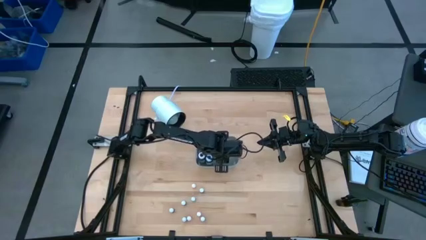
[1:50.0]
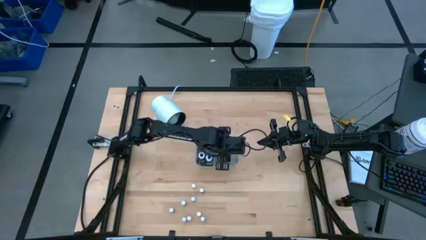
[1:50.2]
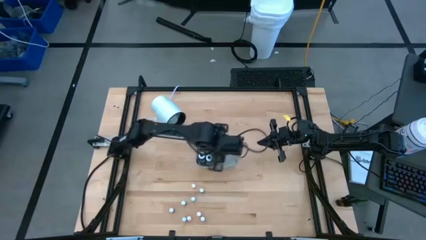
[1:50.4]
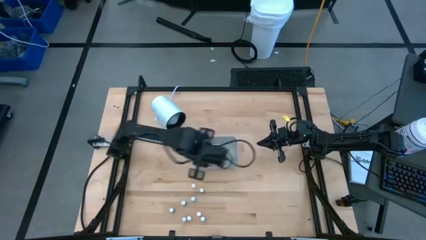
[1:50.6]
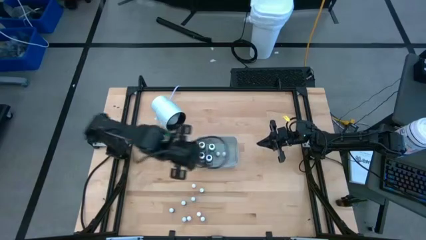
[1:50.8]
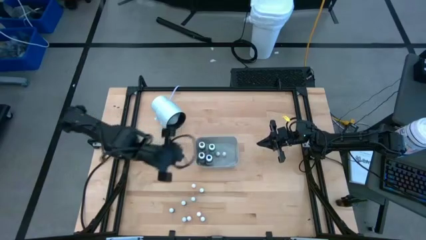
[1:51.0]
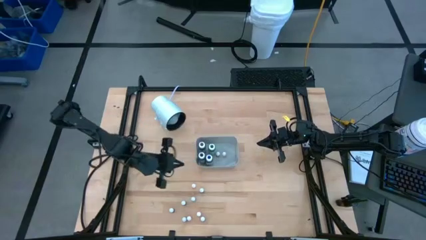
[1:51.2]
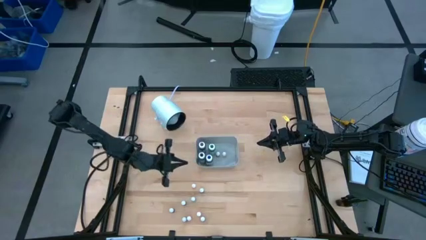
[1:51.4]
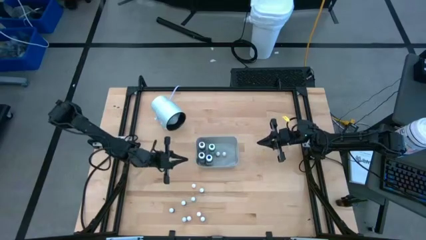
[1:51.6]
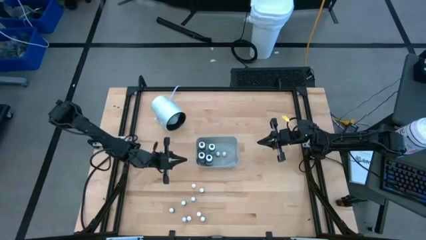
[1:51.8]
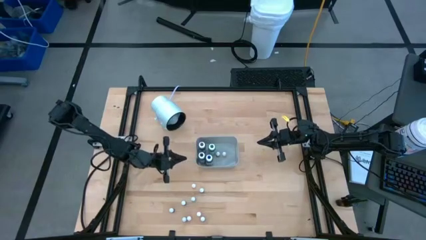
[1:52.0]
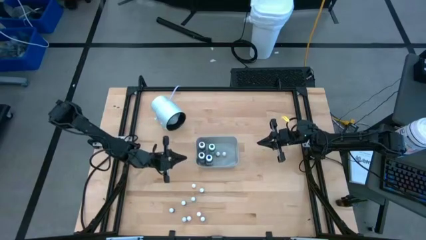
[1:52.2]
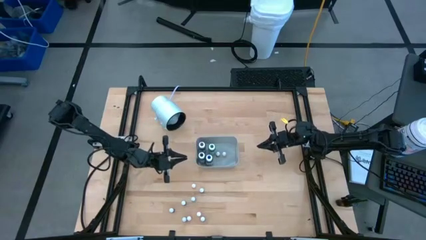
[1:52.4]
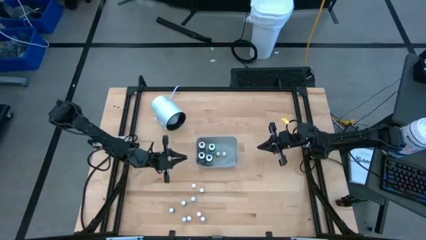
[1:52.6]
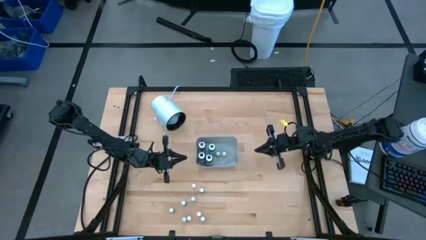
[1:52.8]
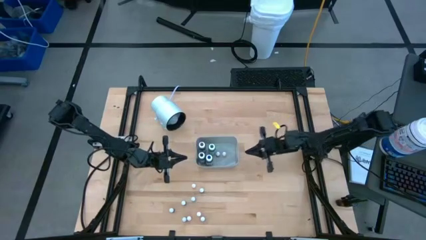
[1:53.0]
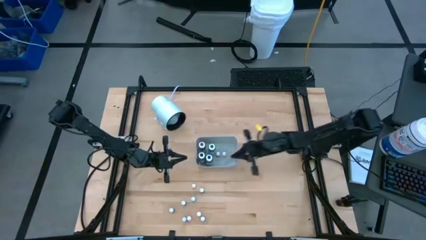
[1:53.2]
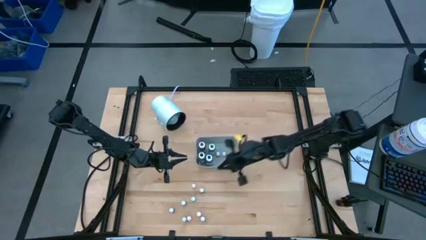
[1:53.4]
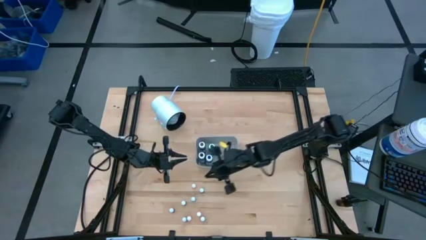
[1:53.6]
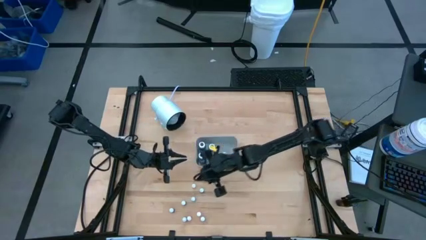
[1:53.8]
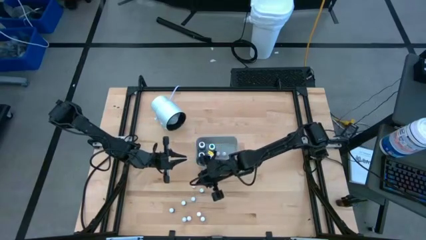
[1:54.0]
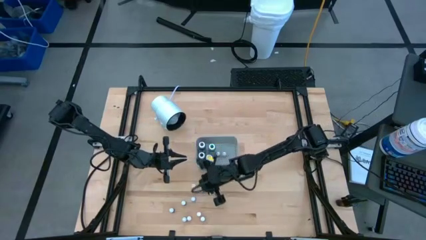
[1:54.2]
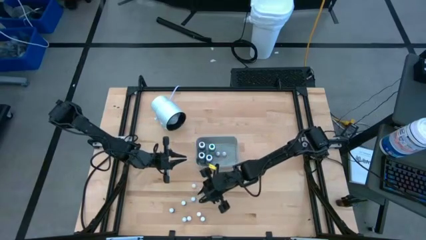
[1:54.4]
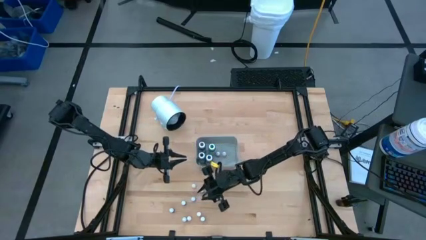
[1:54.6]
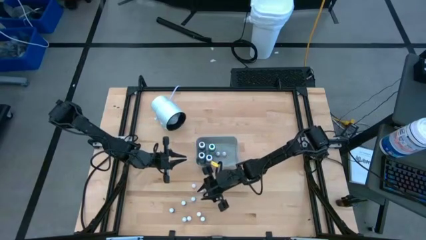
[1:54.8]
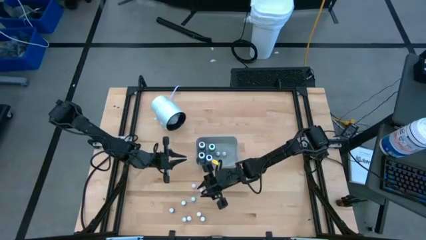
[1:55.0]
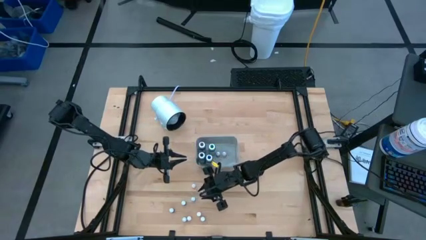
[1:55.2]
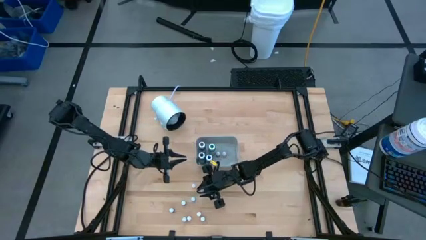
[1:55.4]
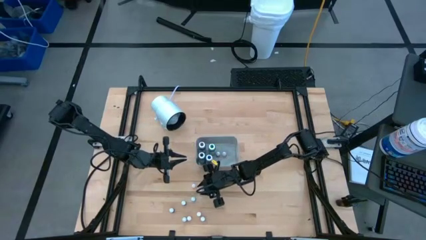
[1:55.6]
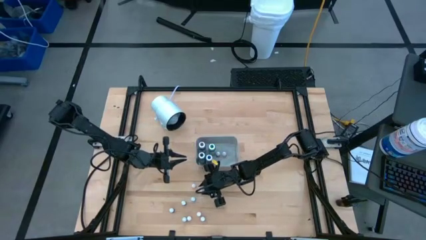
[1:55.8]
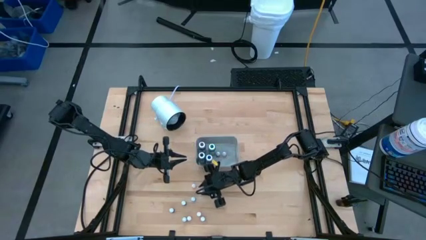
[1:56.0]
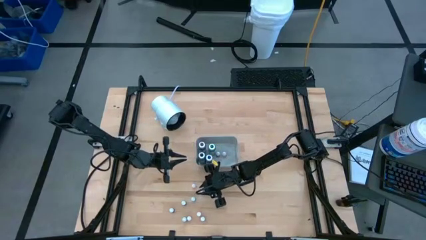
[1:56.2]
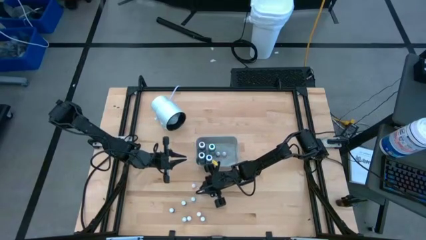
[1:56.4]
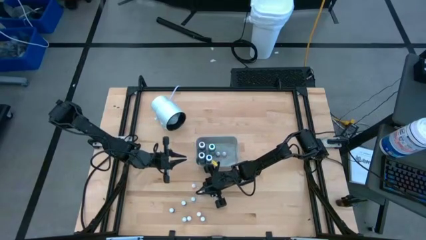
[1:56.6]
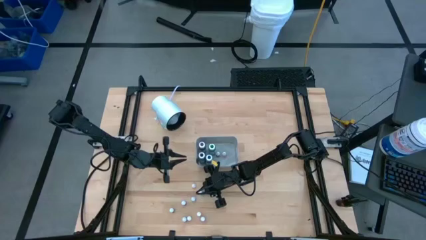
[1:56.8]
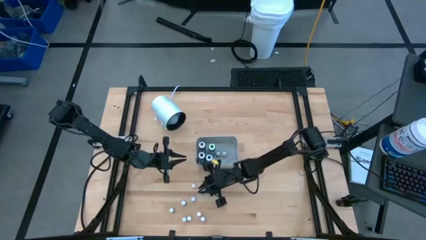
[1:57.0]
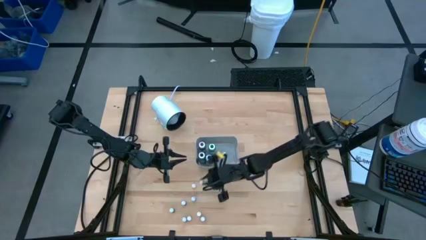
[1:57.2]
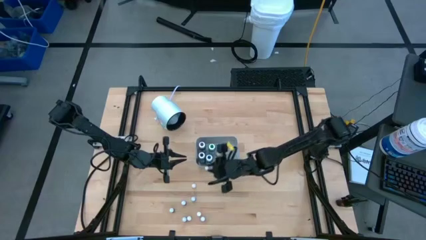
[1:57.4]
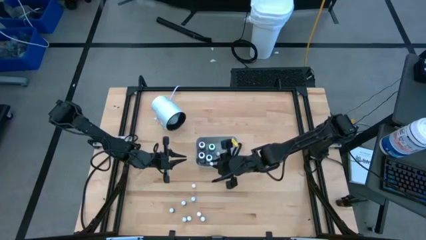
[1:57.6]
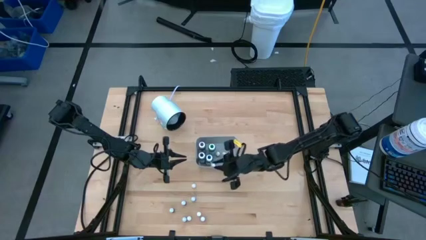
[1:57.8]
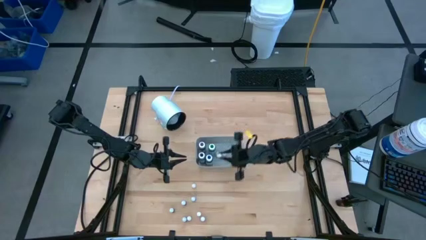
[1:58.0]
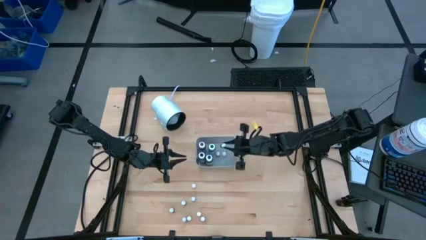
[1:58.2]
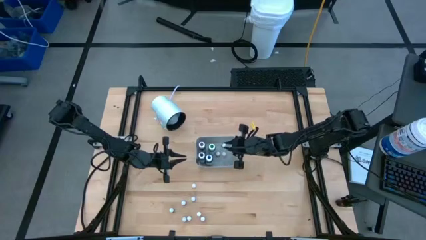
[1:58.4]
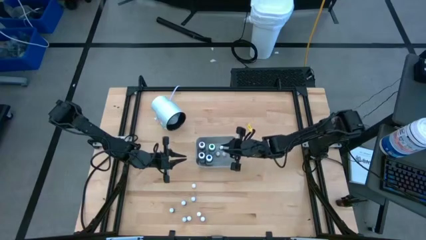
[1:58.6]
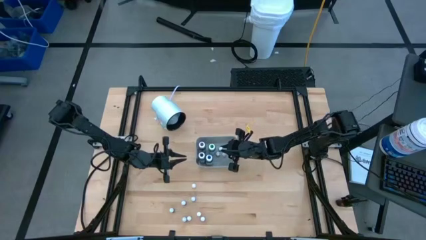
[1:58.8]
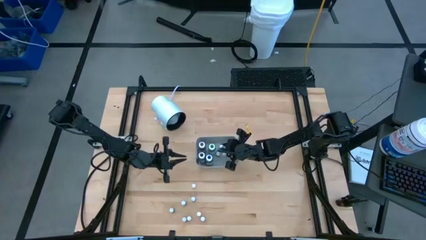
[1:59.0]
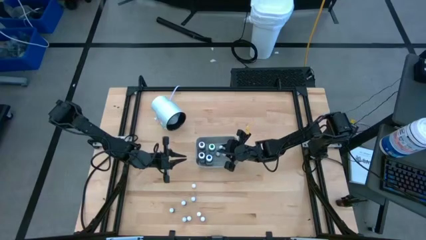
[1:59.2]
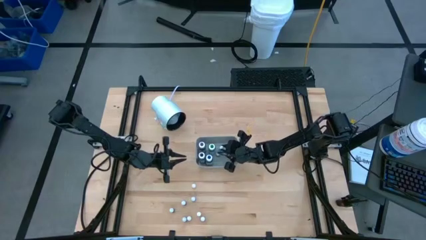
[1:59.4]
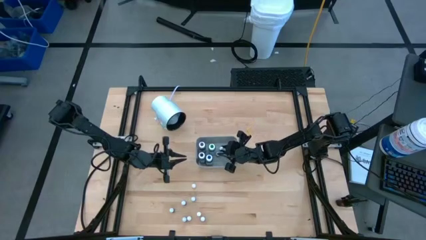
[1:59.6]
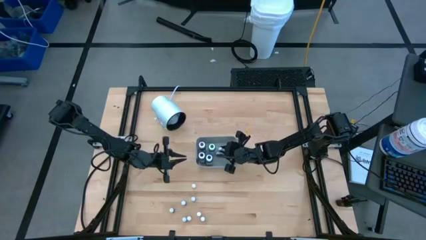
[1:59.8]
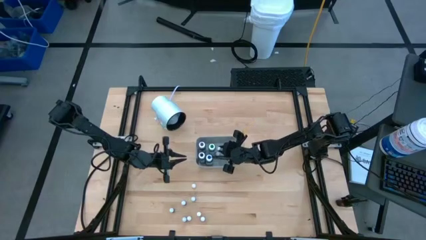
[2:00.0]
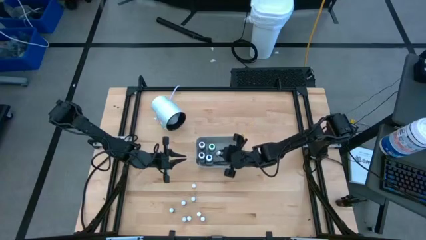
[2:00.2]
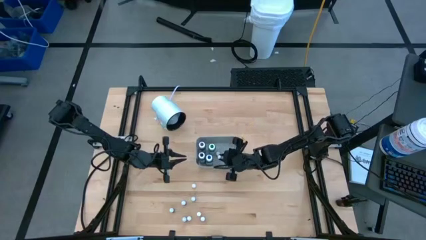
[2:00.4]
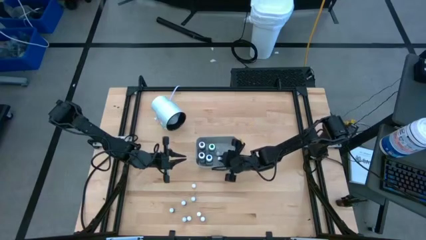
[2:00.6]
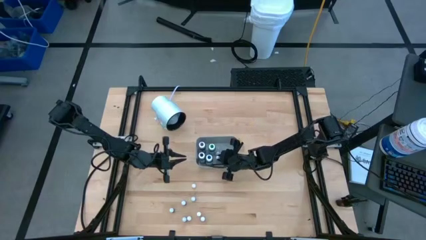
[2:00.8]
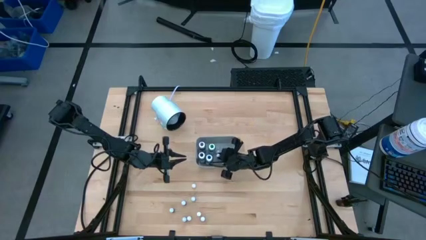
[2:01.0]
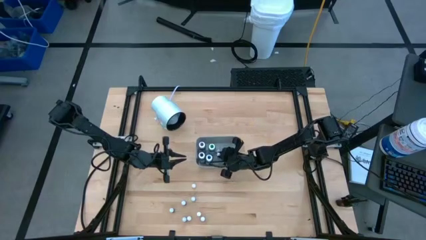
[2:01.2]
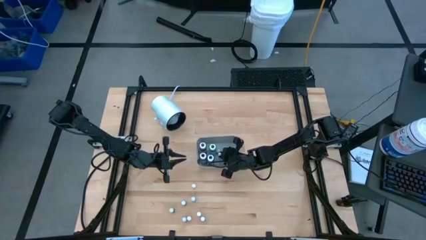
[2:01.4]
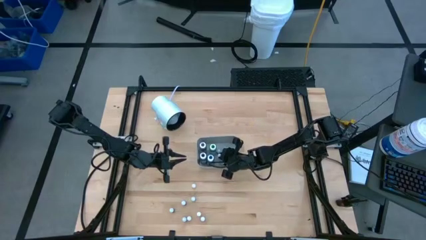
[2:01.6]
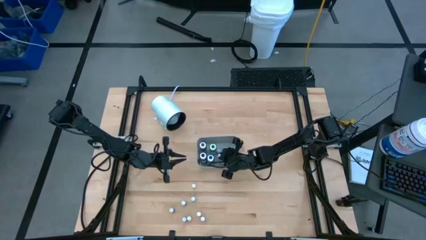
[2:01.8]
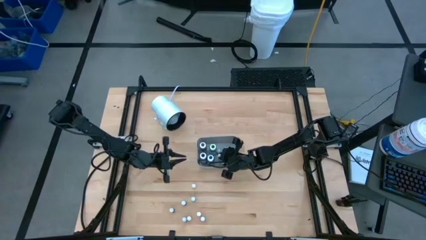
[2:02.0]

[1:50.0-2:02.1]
Task: Pick & Place food coloring
Put the small violet food coloring bottle into the gray bin
